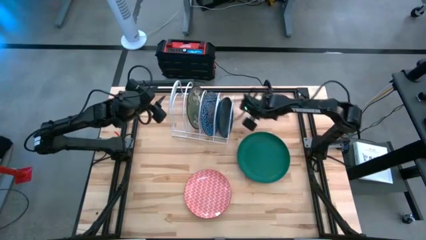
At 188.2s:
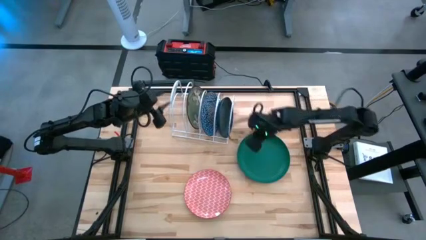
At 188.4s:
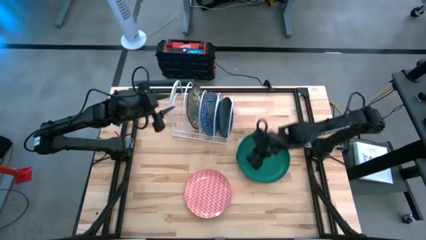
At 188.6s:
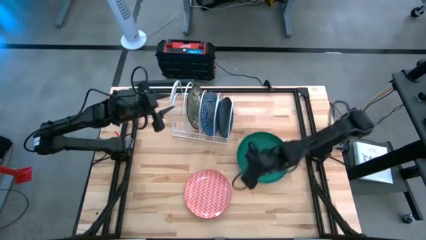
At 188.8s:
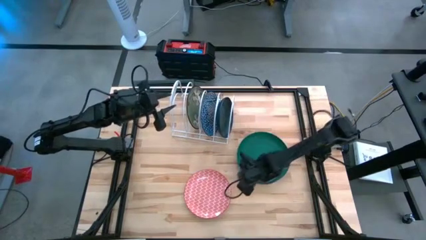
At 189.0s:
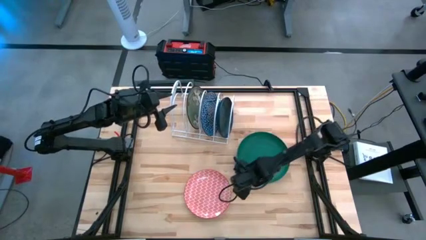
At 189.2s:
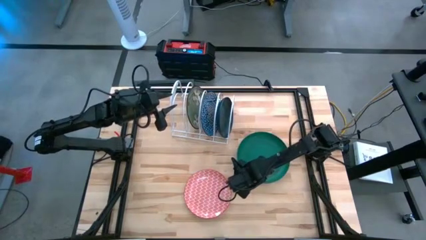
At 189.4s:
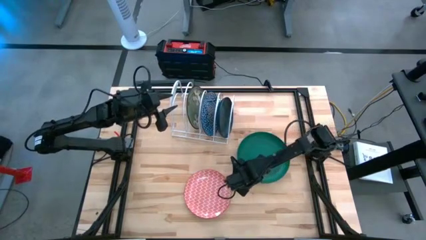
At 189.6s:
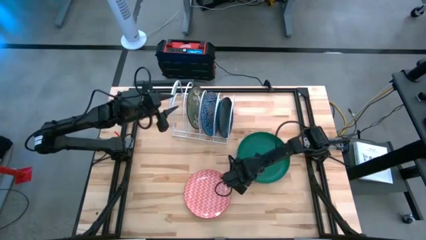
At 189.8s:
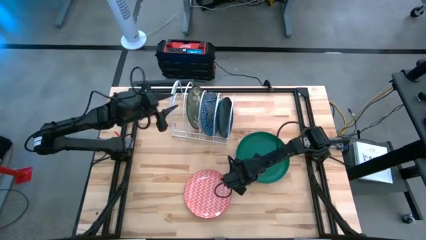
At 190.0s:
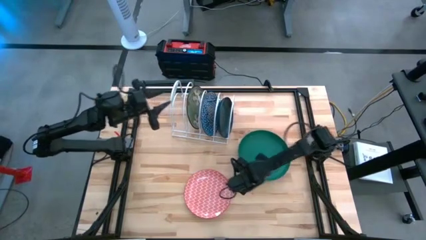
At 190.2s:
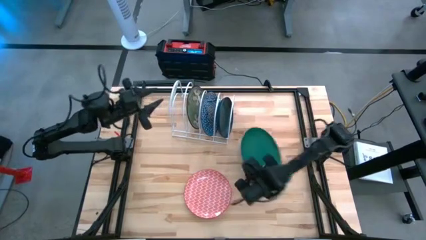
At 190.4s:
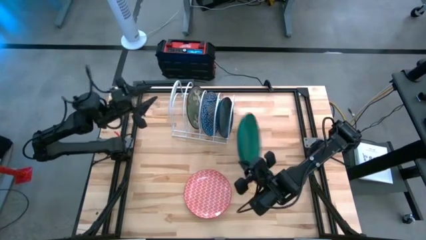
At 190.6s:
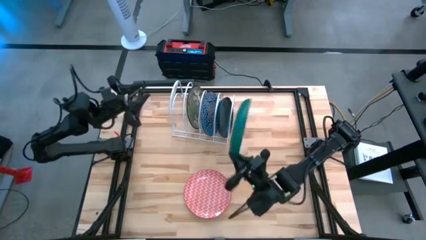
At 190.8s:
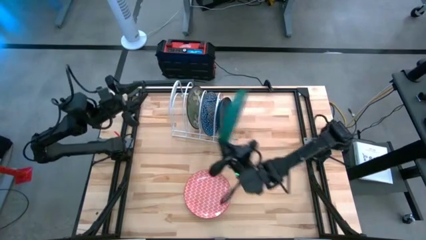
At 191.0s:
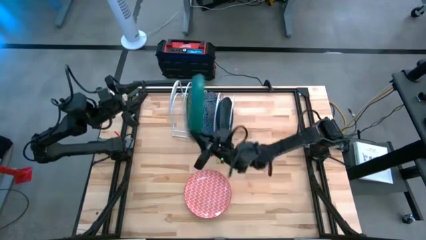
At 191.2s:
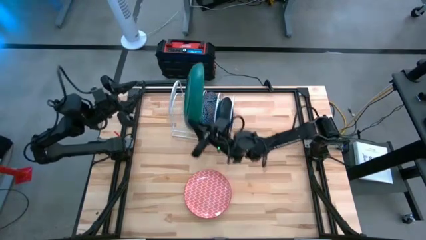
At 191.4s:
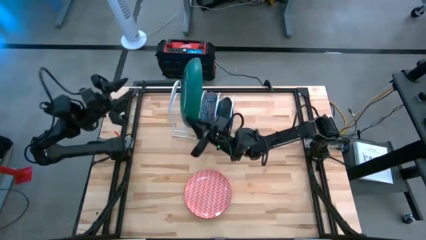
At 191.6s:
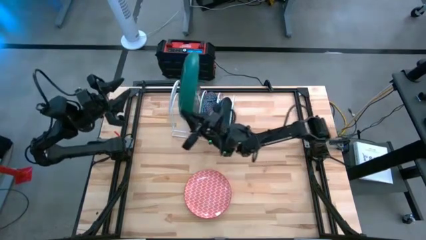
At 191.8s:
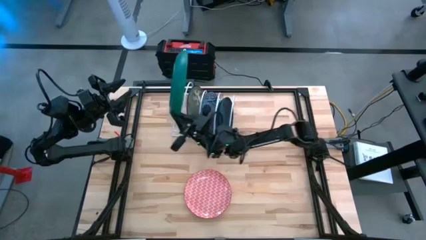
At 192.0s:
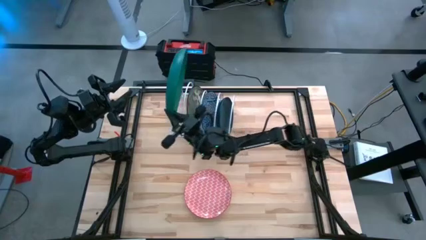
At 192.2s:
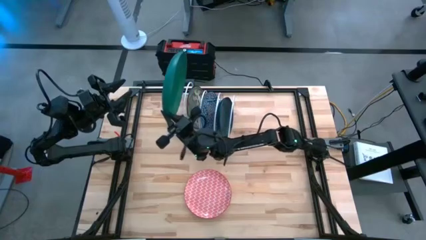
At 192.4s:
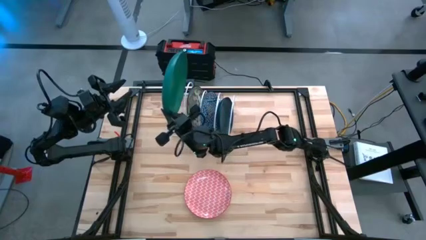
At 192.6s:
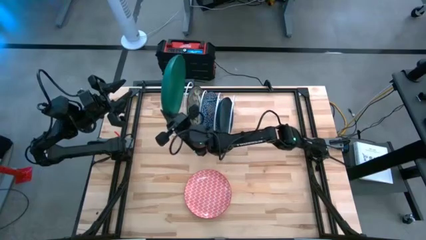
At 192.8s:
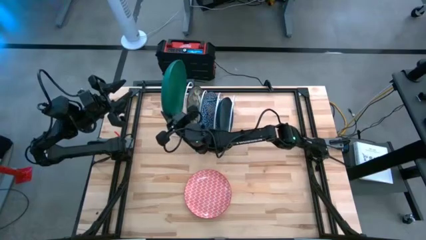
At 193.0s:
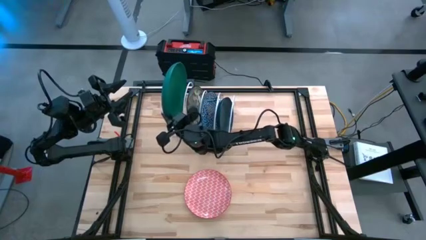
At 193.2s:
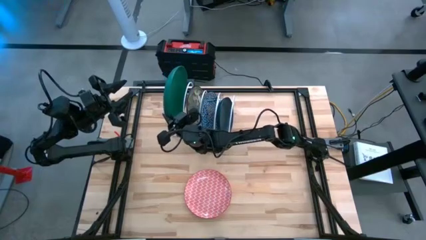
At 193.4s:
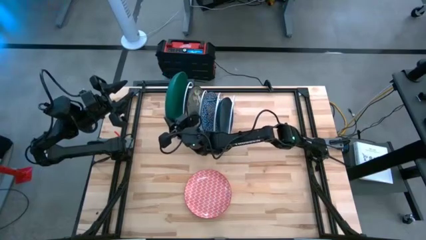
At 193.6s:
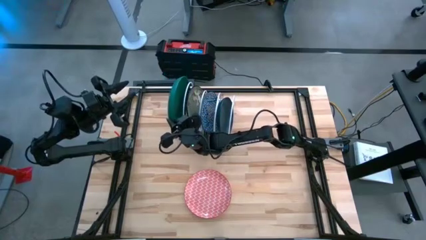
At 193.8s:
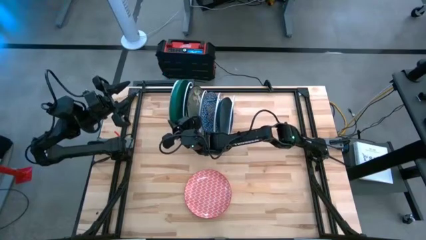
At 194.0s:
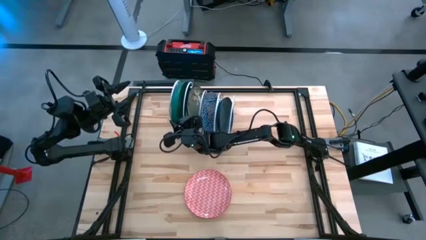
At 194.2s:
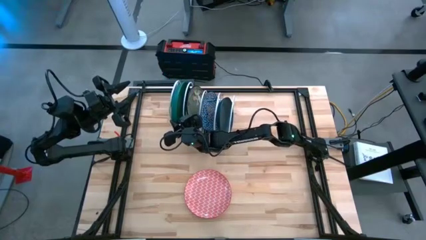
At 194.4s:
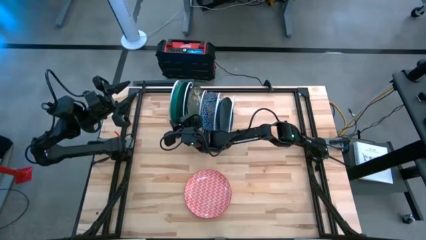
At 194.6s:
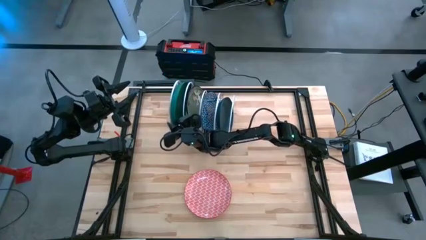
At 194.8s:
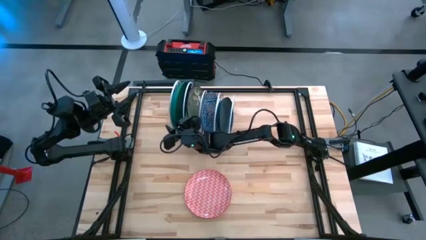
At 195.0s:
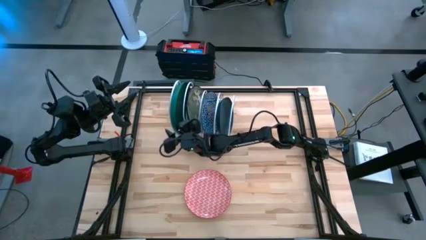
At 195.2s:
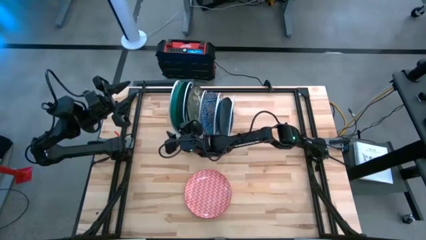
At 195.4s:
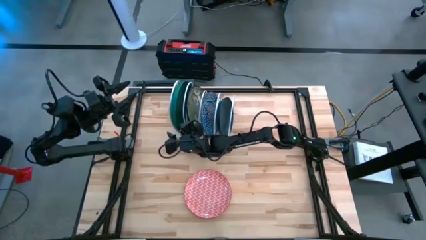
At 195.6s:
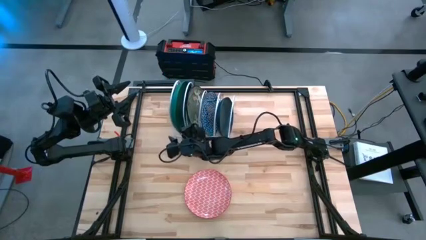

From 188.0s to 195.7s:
Task: Sort dishes
Put the dark green plate into the dish rack

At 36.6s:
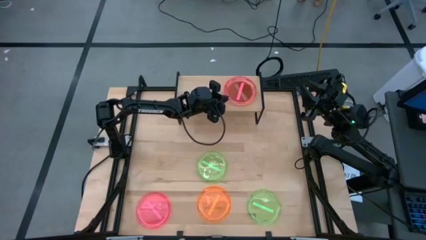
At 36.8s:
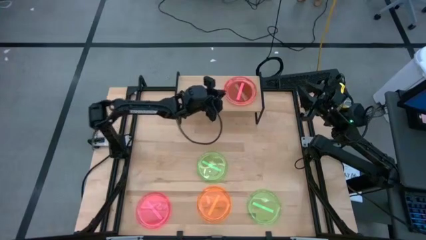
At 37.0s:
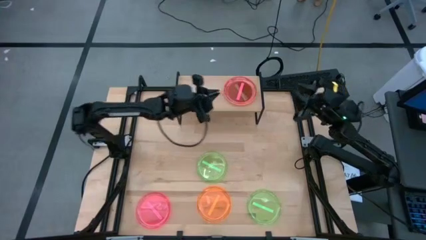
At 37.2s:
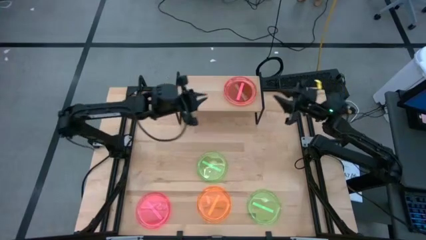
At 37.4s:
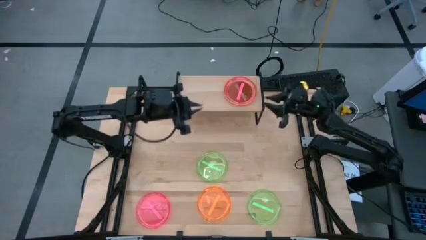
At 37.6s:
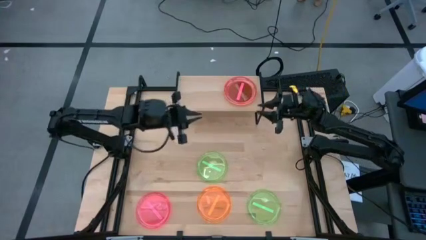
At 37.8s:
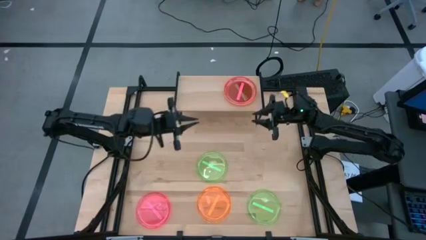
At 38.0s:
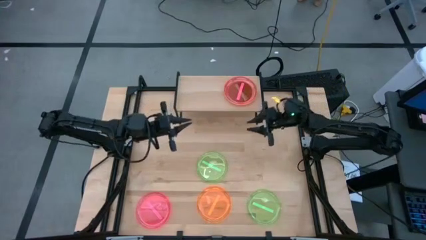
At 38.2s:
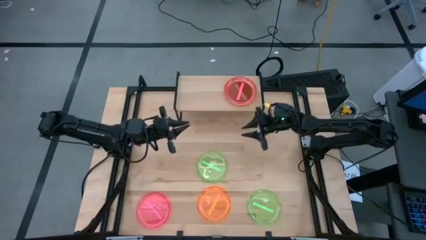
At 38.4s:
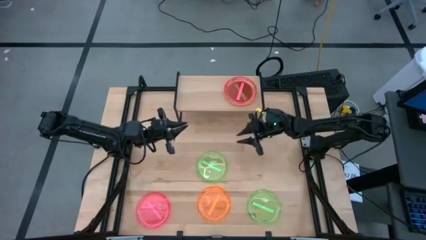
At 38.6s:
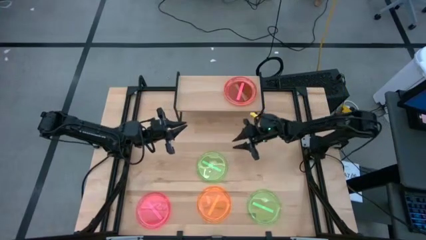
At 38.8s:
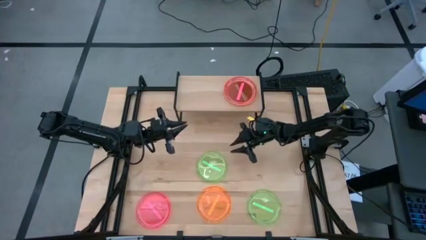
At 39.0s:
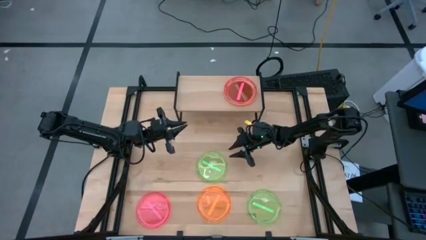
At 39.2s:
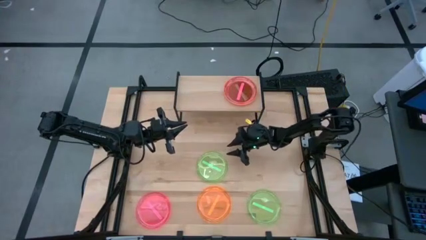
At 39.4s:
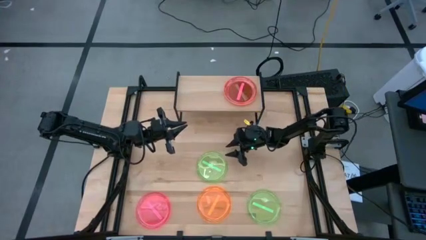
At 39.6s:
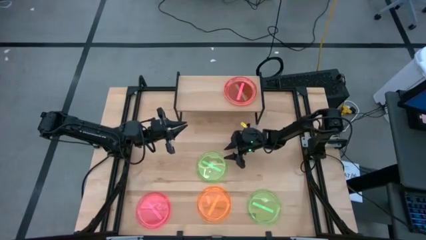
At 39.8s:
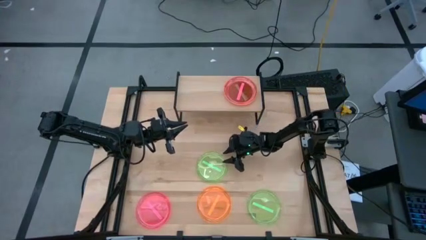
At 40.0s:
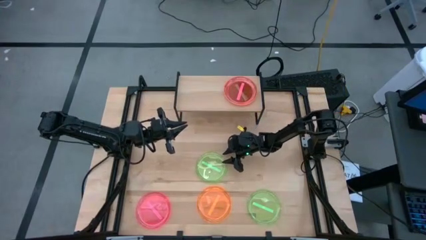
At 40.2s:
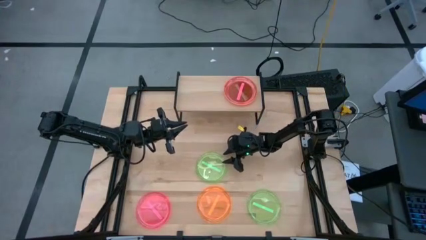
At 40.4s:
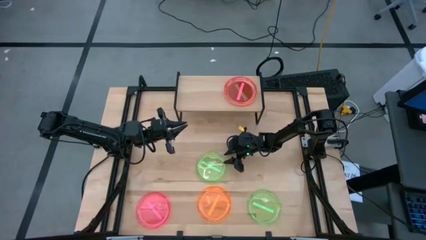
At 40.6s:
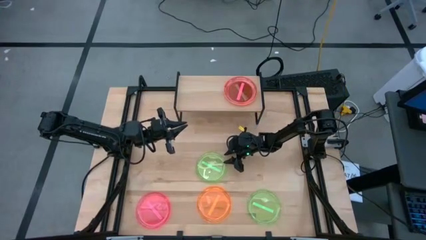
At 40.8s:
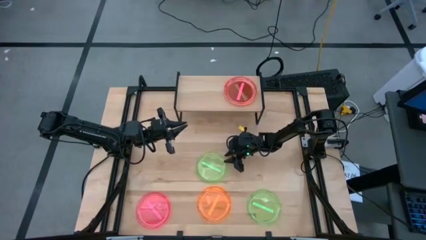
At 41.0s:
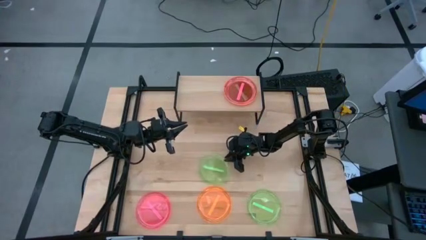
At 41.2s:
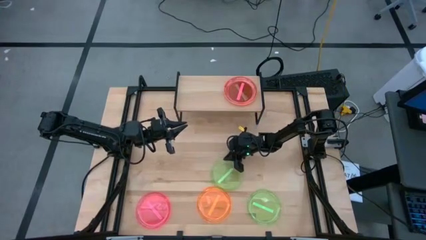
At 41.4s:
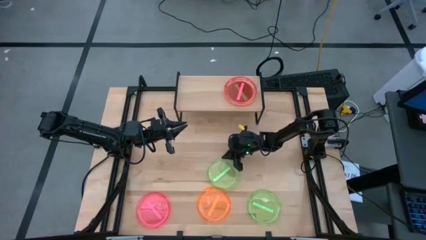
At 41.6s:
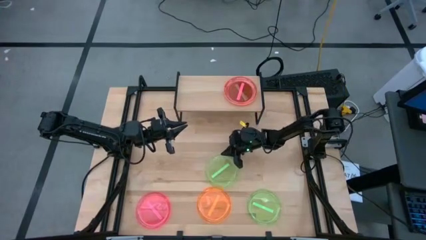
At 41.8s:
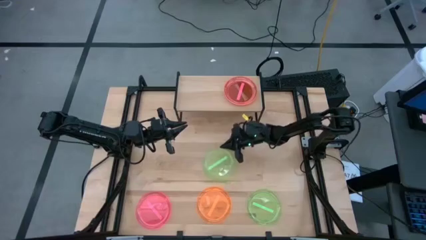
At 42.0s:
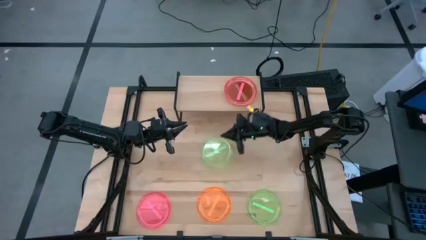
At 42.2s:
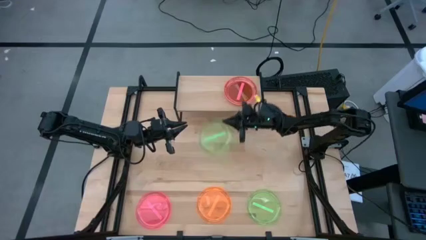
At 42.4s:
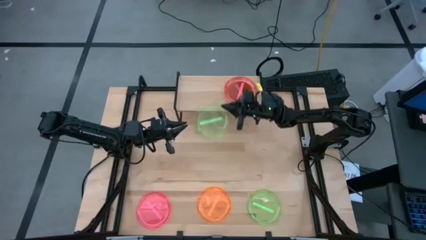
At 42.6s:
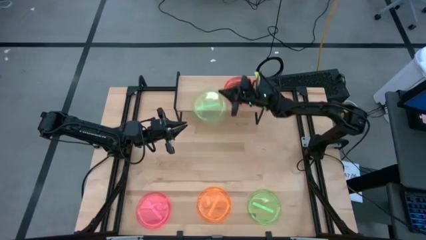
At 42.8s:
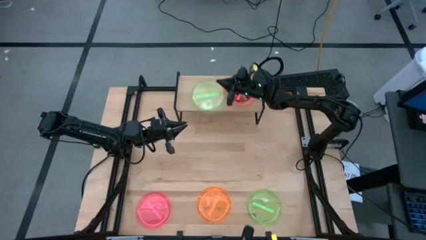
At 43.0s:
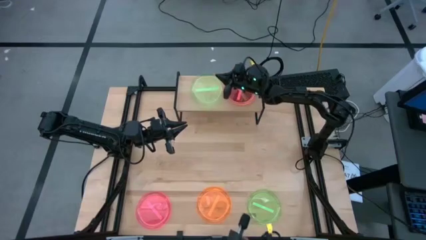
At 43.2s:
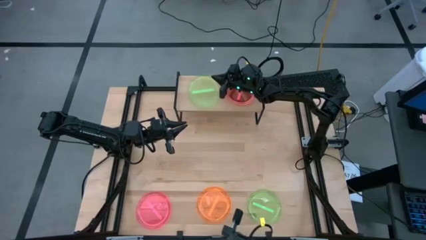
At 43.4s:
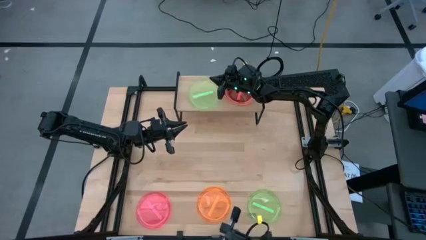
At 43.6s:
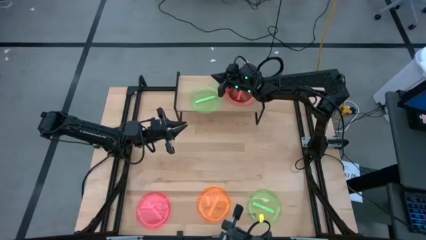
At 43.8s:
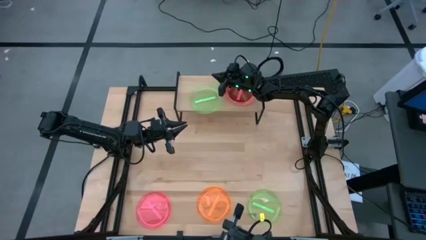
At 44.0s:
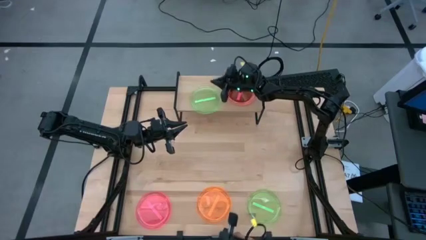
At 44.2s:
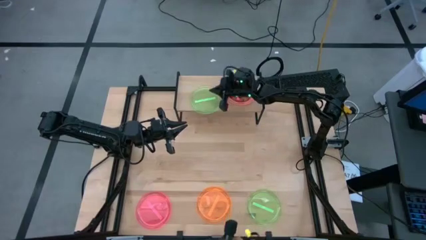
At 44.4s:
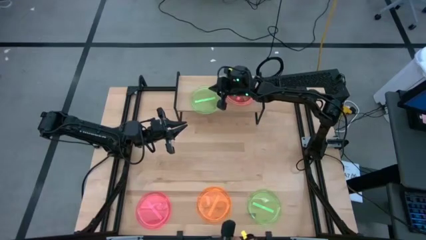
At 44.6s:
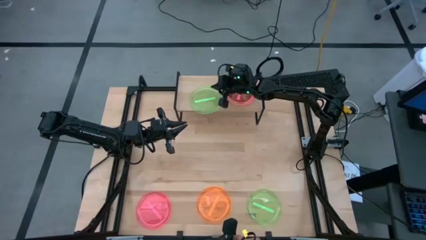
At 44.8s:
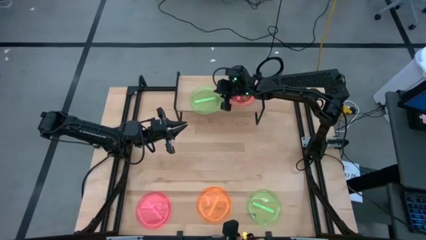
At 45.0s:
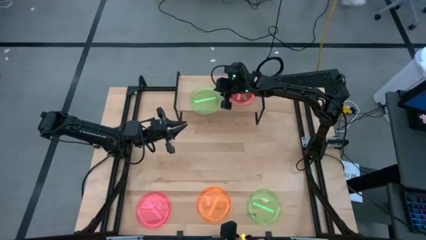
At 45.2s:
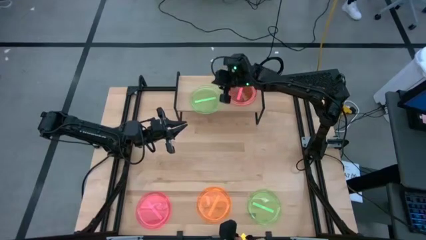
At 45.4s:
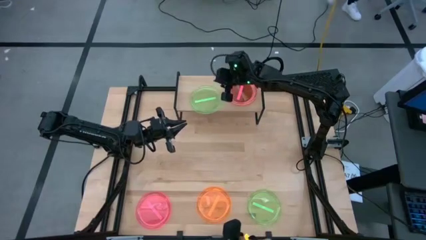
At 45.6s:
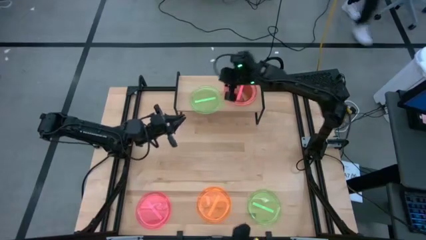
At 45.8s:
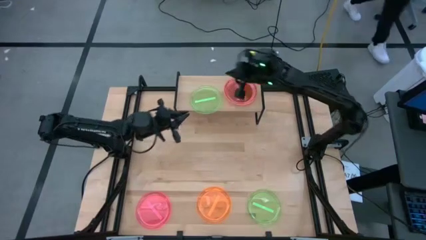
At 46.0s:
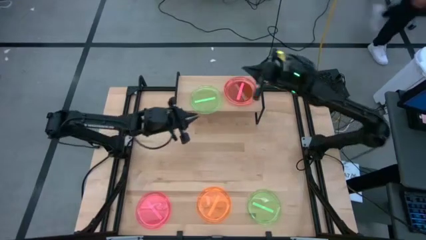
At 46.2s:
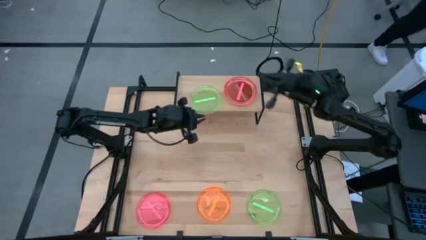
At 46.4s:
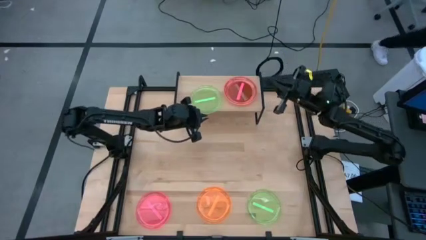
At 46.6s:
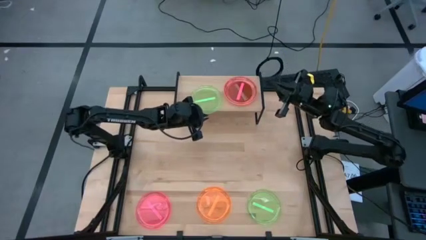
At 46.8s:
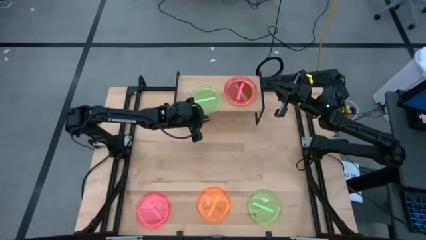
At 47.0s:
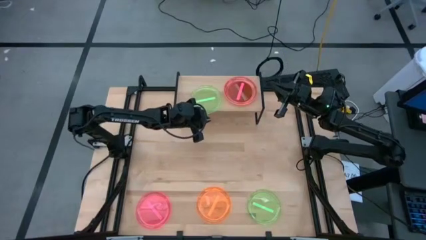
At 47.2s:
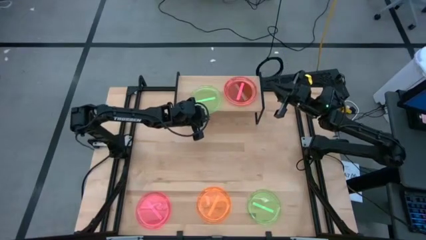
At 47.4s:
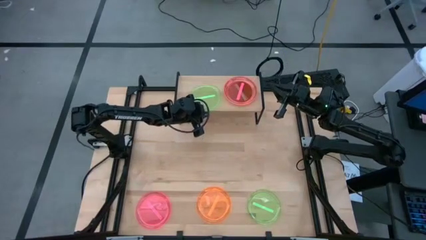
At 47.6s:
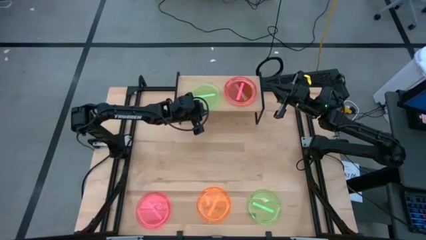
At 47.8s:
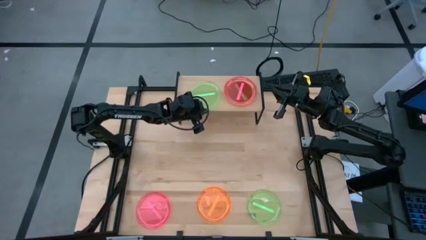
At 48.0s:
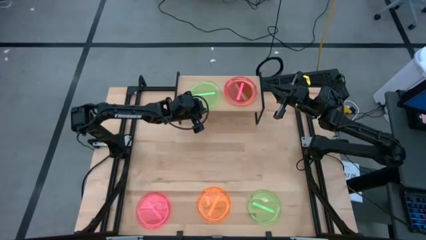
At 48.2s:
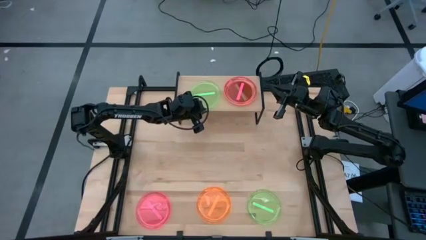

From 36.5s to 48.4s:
Task: Place and stack plates onto a shelf
Put the top green plate on the shelf
